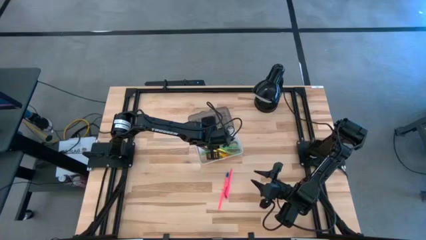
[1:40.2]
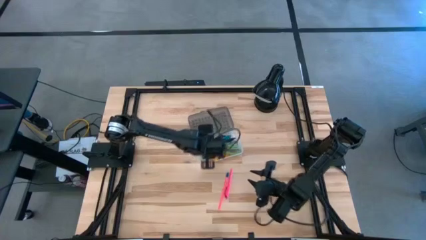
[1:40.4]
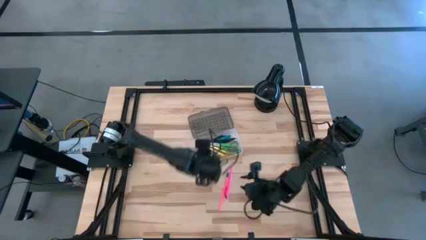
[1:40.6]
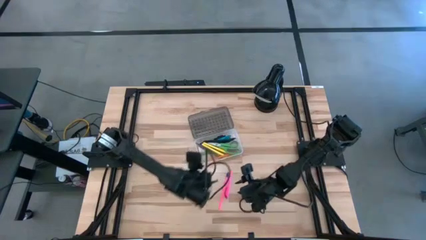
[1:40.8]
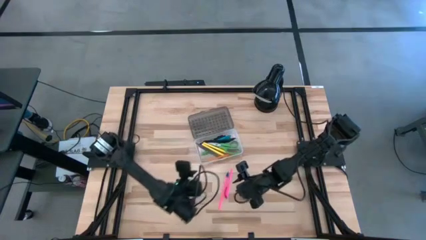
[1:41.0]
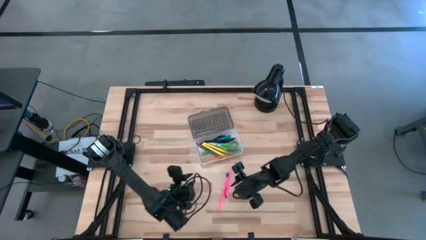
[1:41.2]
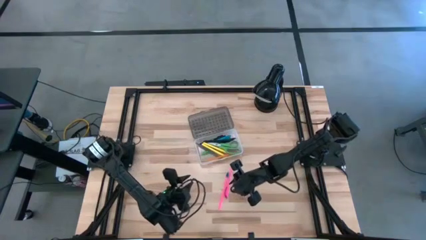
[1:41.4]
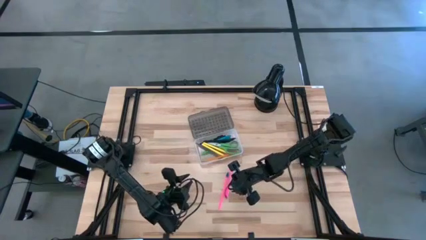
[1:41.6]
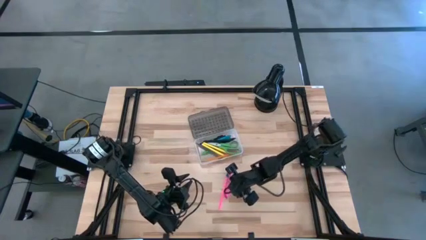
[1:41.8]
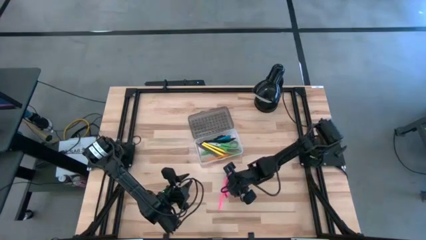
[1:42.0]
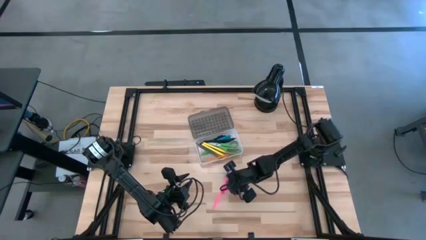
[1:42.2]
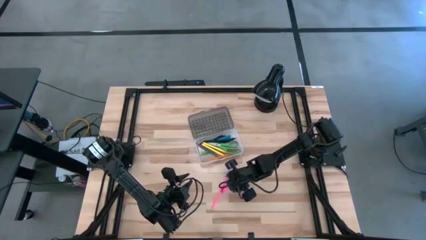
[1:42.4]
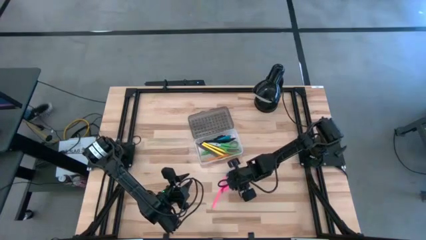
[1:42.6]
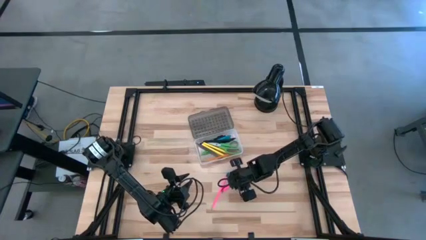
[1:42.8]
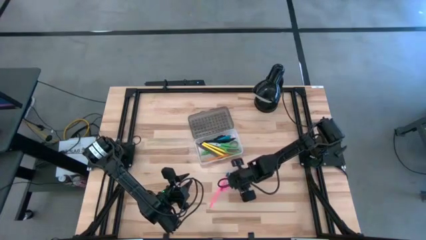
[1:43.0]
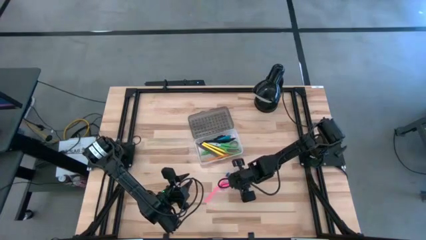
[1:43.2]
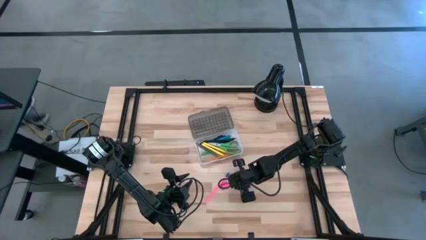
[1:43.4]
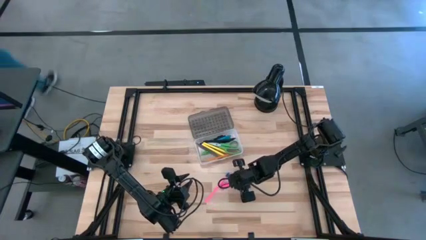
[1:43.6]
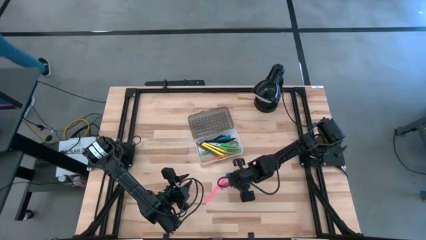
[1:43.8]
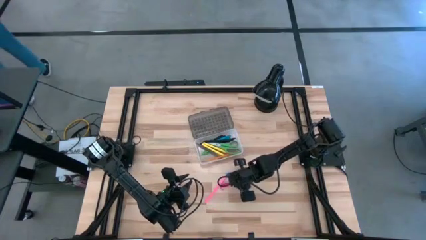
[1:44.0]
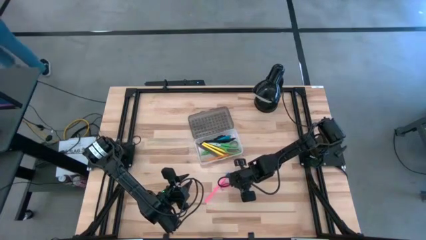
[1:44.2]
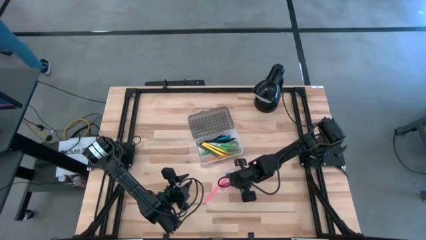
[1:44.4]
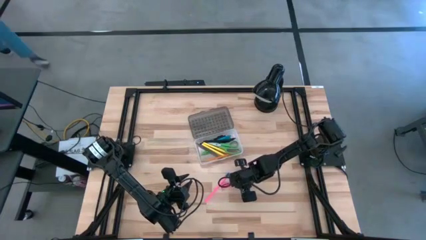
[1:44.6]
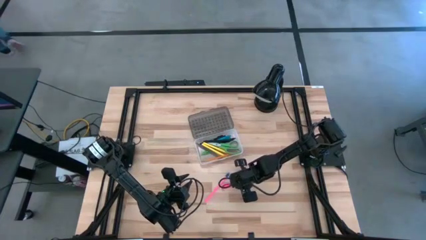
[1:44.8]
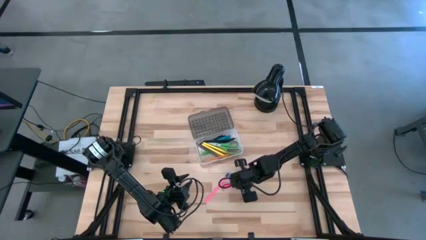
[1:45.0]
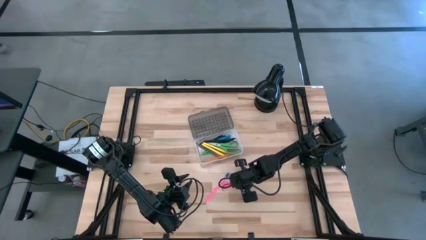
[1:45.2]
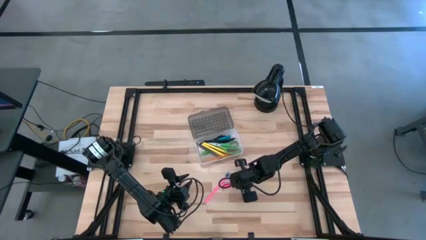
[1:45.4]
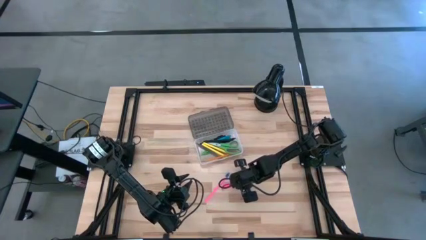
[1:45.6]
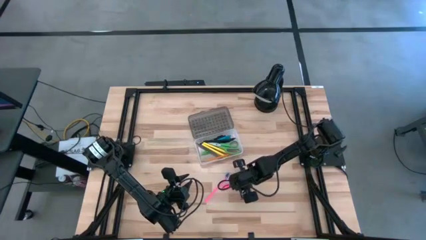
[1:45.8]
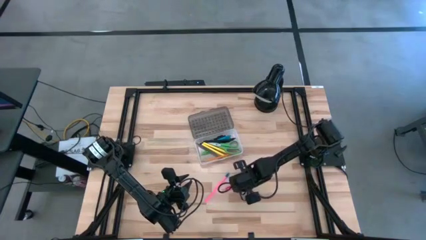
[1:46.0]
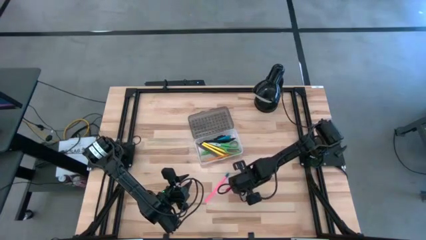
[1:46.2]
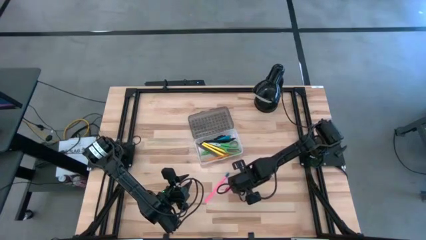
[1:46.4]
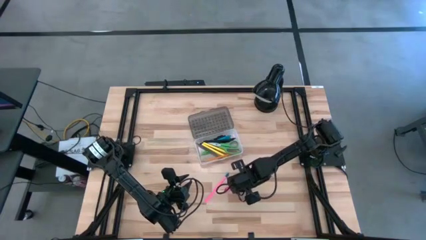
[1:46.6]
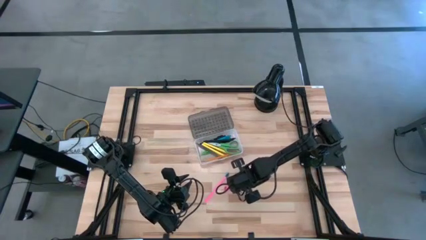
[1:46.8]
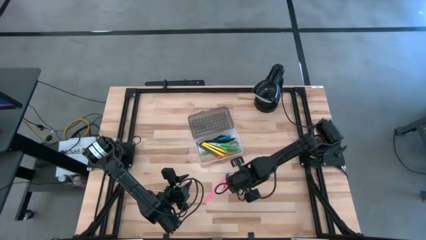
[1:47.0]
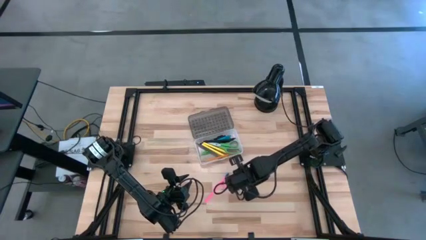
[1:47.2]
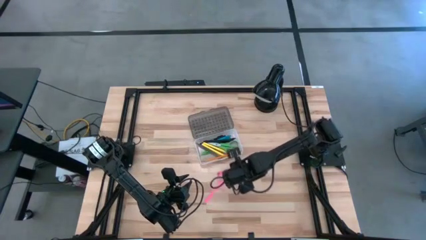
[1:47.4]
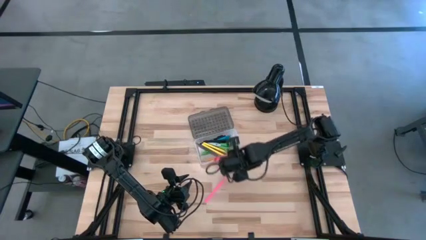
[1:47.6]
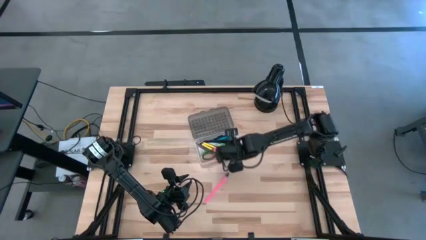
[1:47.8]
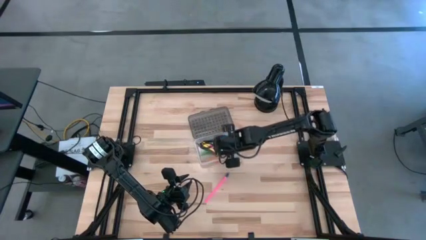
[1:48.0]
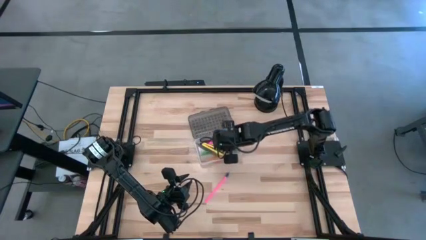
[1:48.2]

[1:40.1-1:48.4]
Task: Pick & place school supplies into a supply box
Put the right pink pen into the transparent supply box

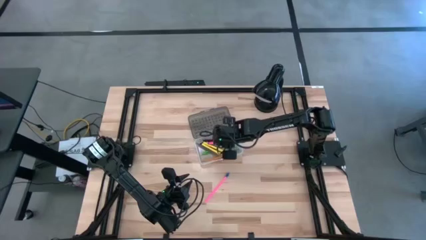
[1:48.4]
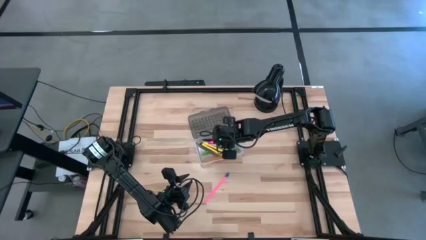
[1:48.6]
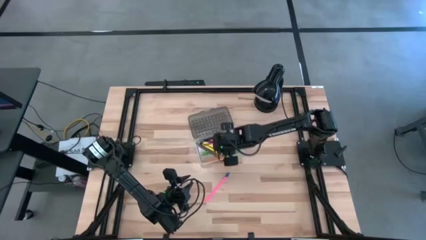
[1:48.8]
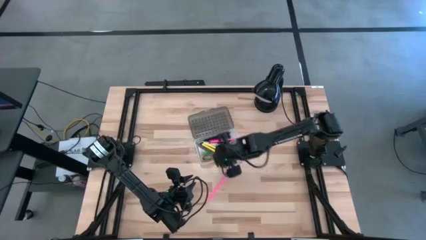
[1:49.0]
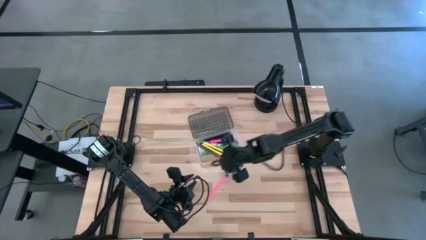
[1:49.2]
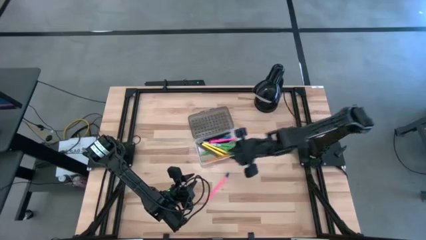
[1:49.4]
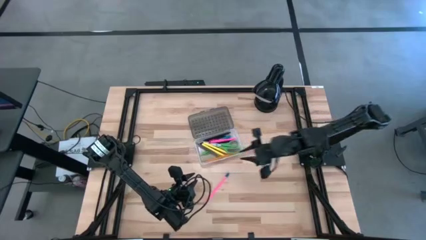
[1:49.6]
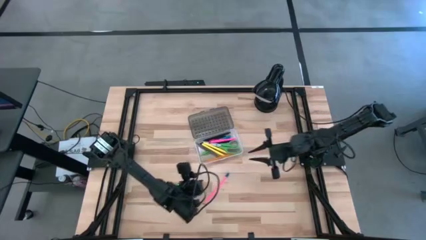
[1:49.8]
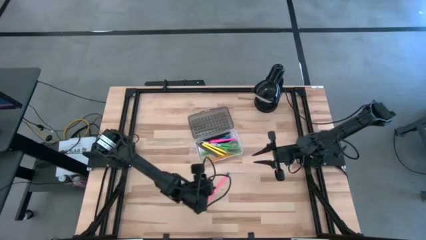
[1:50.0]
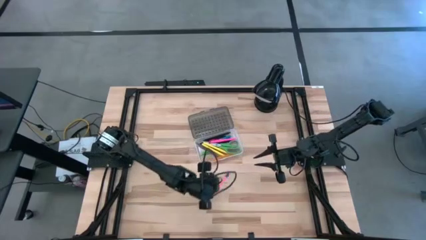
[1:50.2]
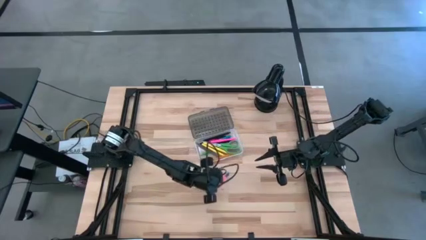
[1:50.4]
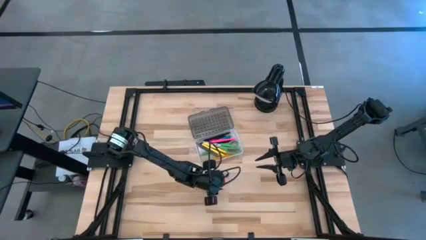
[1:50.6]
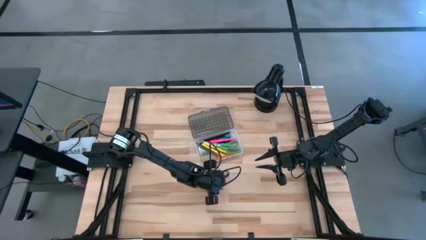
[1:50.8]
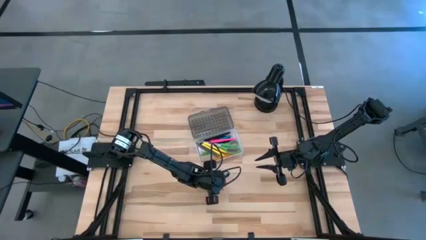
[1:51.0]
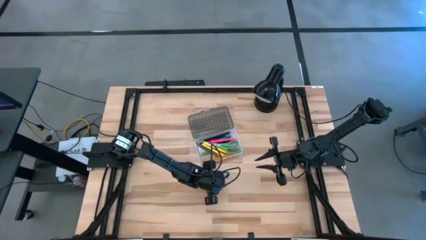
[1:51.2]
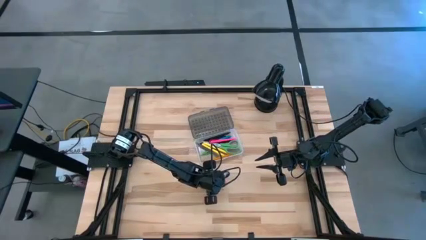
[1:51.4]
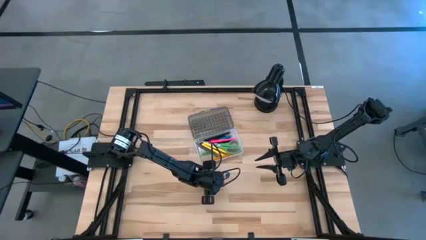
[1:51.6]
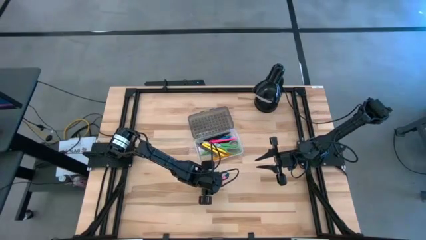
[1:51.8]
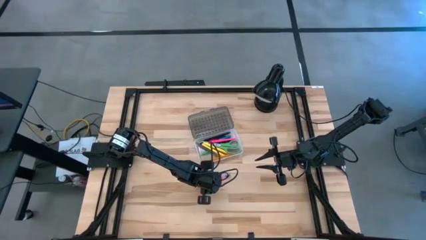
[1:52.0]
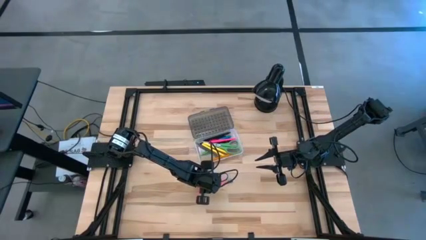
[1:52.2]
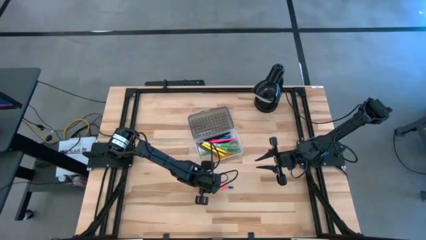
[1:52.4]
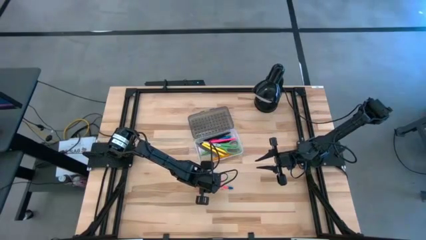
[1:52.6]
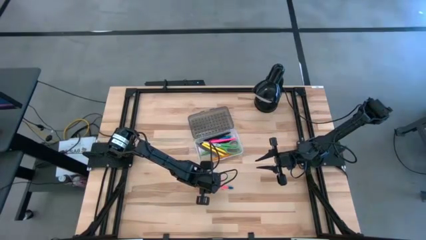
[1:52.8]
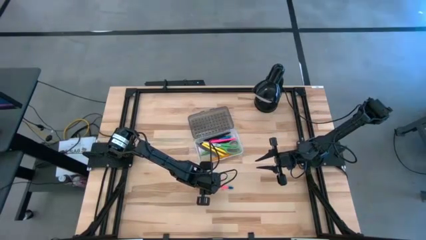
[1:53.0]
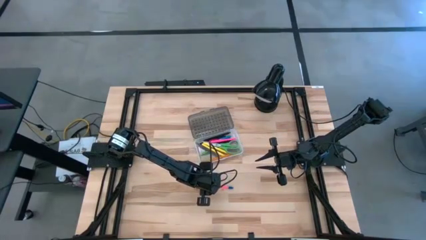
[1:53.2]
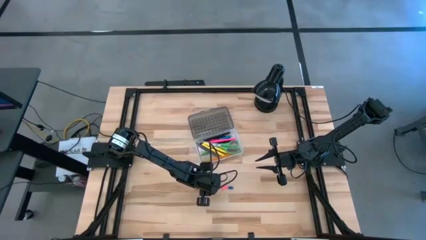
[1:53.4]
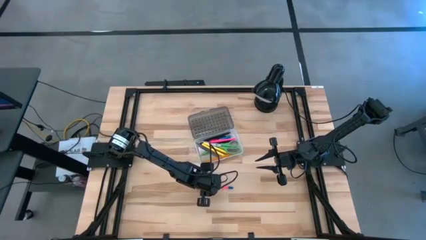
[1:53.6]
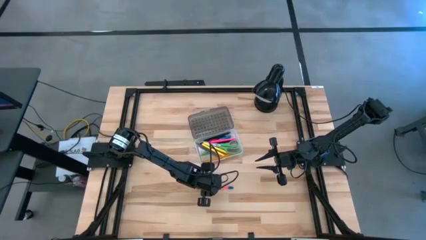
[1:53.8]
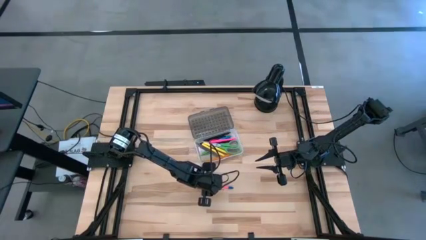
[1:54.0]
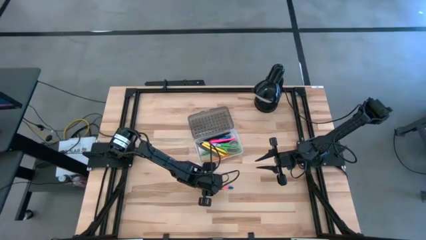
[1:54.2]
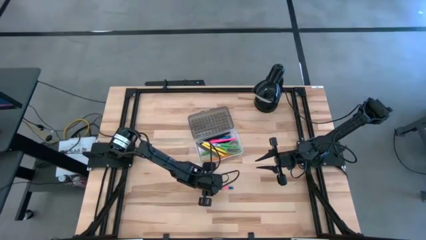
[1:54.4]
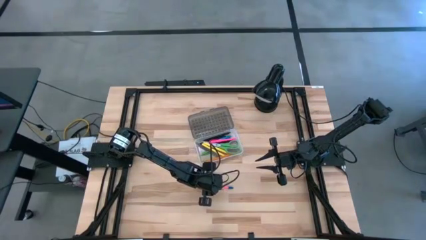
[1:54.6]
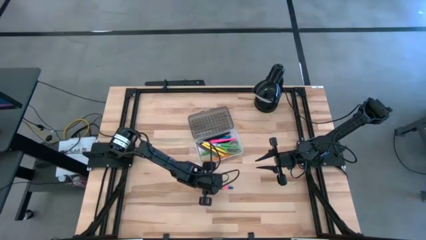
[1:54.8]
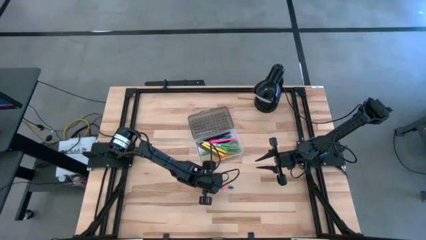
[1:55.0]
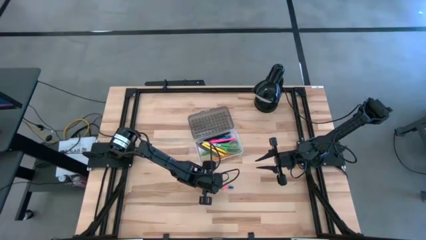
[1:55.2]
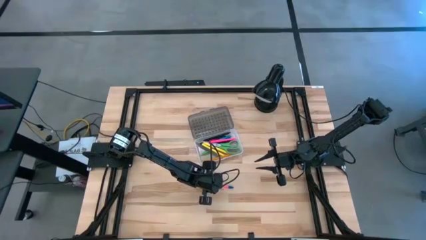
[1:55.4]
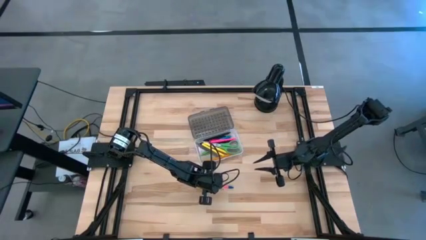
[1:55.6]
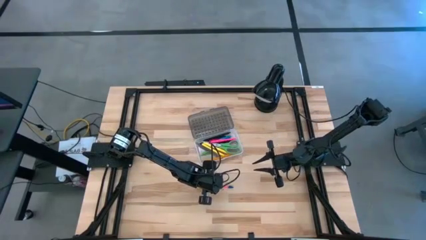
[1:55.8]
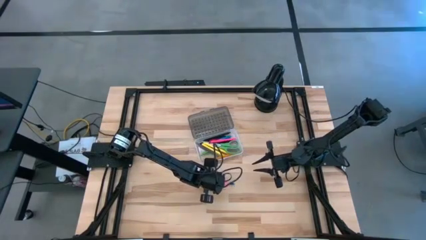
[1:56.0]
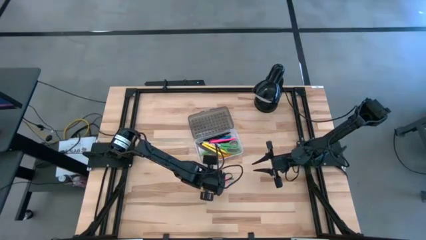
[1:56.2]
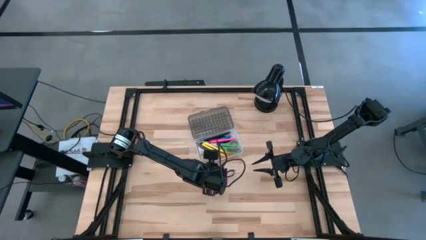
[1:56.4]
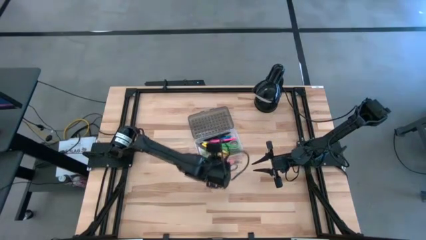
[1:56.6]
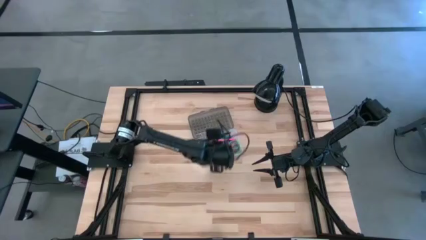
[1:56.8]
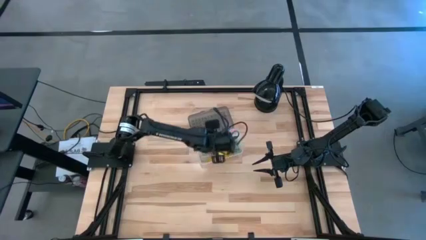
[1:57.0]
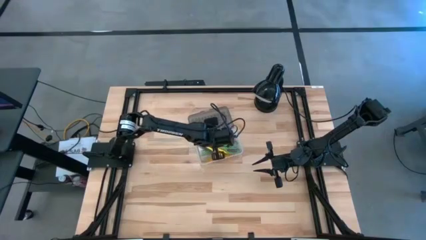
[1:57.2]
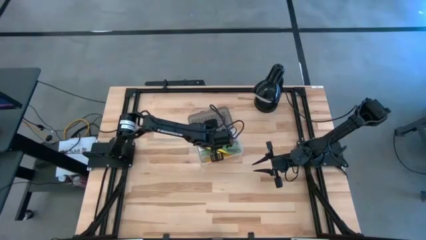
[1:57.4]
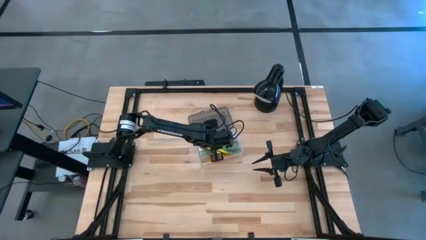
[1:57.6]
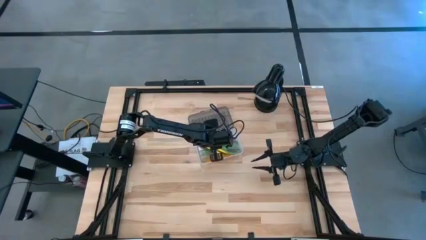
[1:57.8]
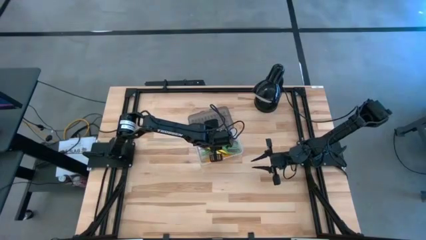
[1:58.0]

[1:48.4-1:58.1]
Put the pink pen into the transparent supply box
